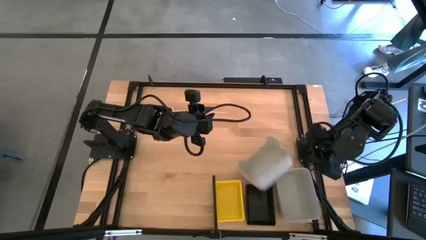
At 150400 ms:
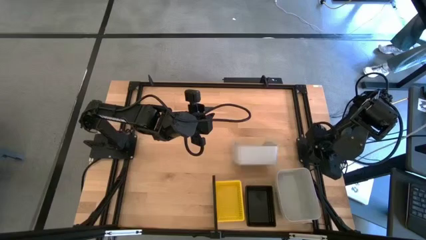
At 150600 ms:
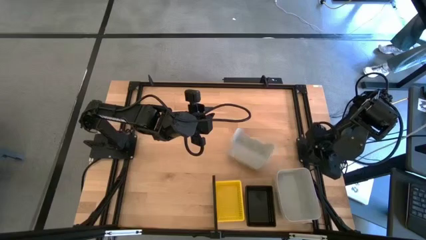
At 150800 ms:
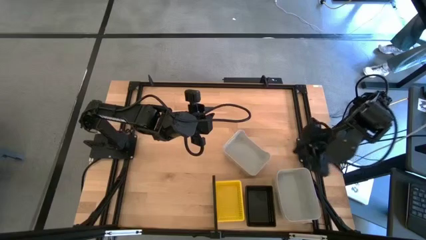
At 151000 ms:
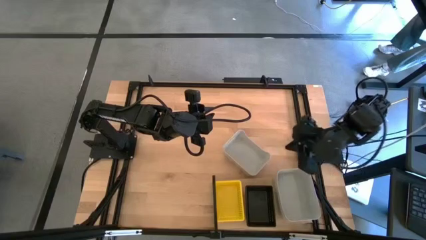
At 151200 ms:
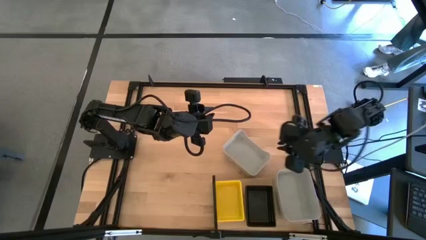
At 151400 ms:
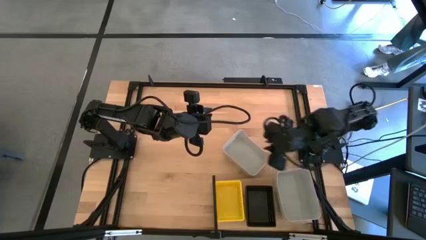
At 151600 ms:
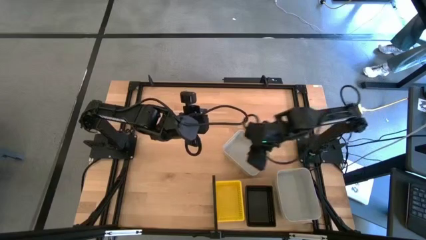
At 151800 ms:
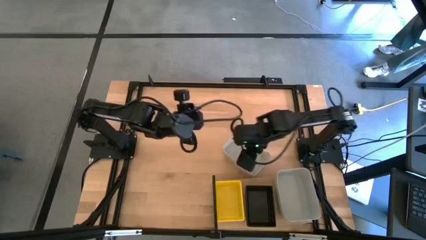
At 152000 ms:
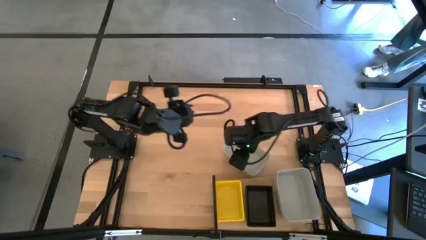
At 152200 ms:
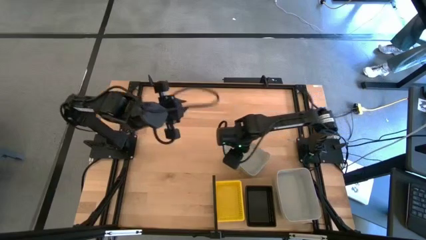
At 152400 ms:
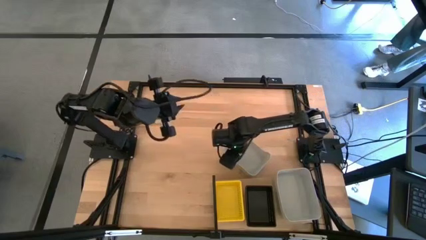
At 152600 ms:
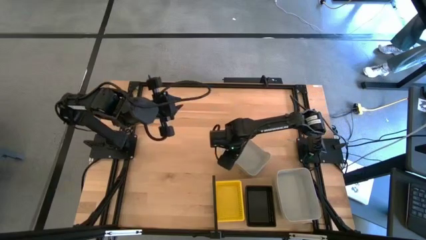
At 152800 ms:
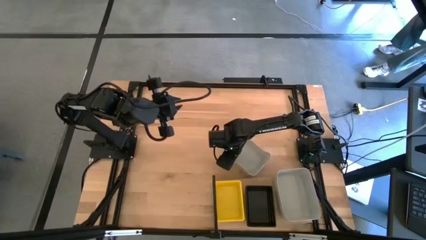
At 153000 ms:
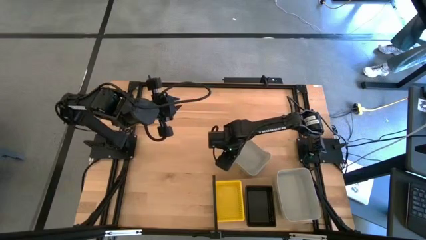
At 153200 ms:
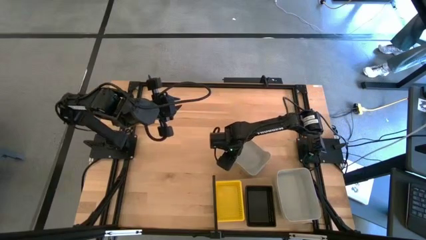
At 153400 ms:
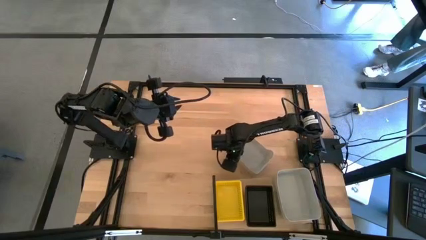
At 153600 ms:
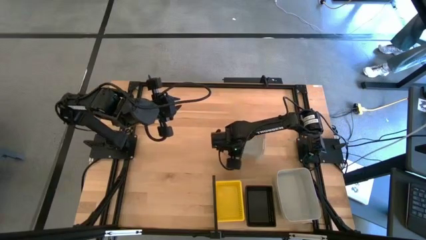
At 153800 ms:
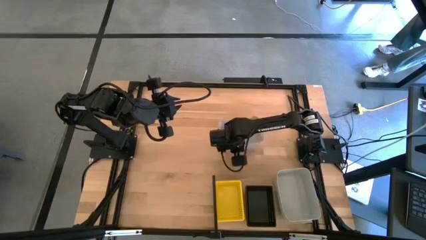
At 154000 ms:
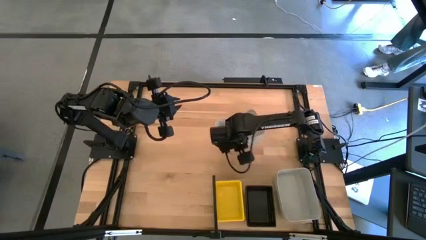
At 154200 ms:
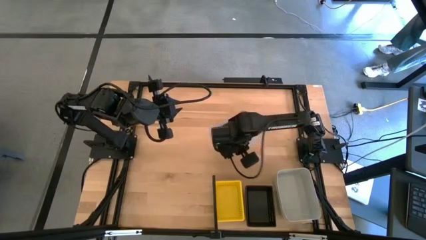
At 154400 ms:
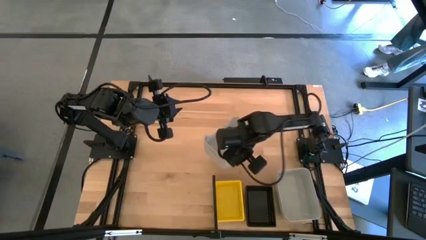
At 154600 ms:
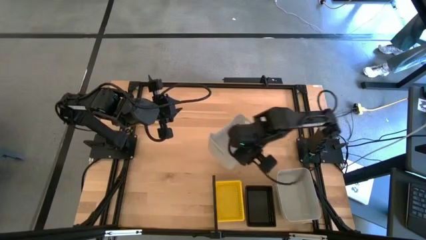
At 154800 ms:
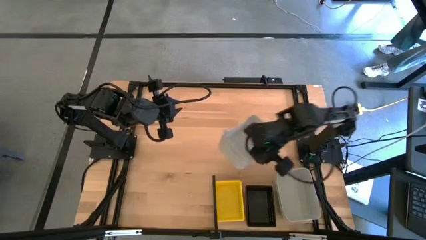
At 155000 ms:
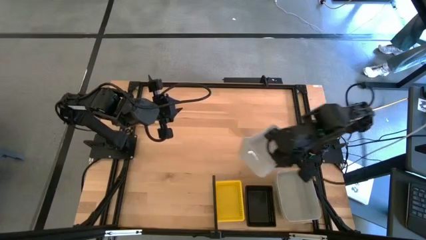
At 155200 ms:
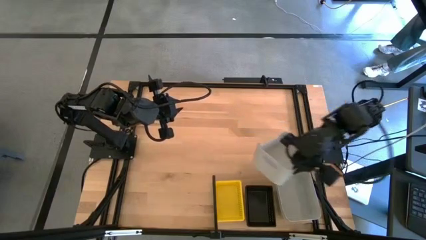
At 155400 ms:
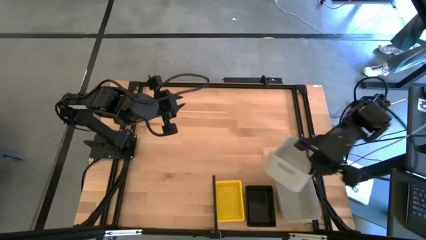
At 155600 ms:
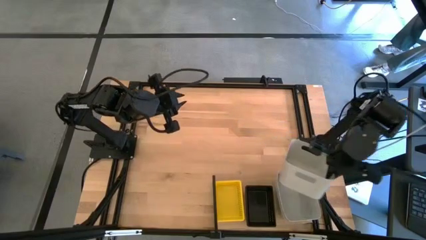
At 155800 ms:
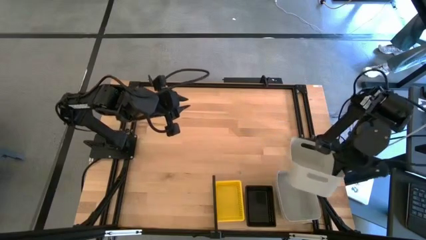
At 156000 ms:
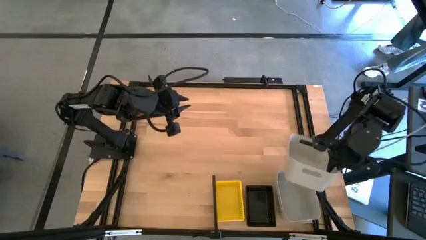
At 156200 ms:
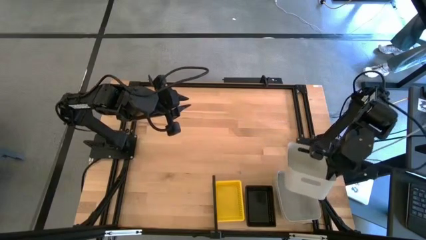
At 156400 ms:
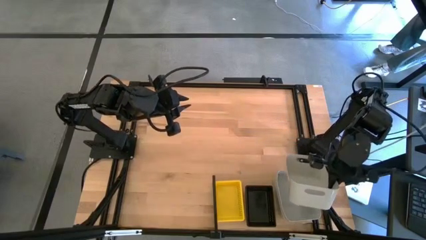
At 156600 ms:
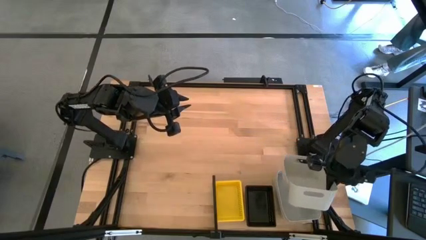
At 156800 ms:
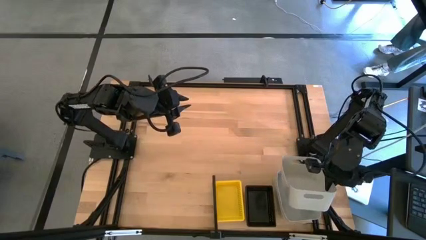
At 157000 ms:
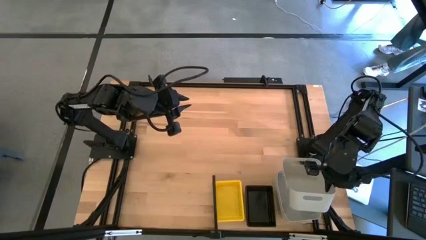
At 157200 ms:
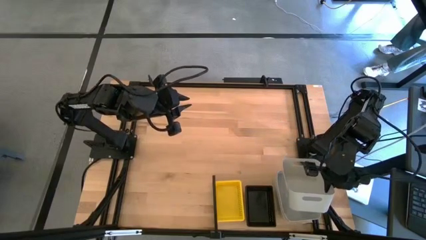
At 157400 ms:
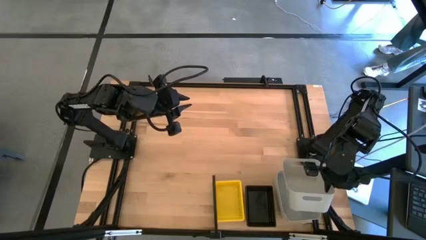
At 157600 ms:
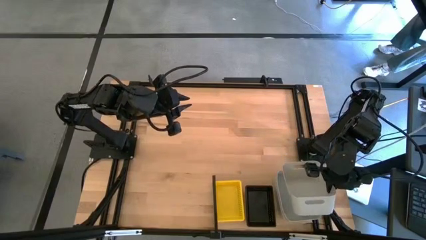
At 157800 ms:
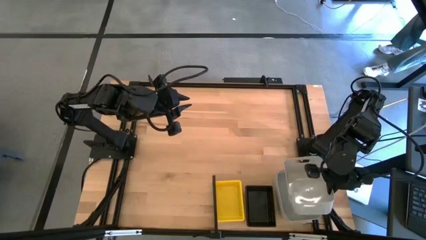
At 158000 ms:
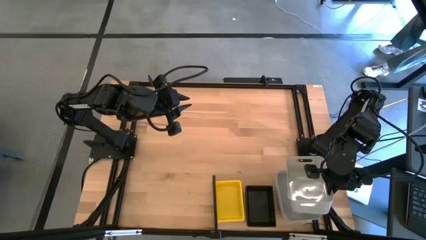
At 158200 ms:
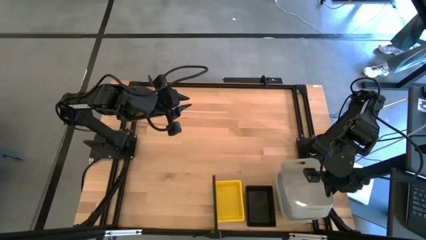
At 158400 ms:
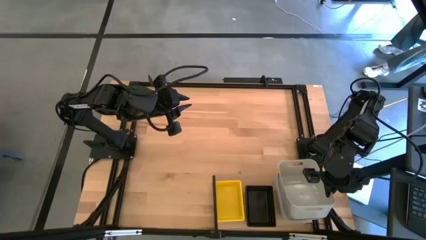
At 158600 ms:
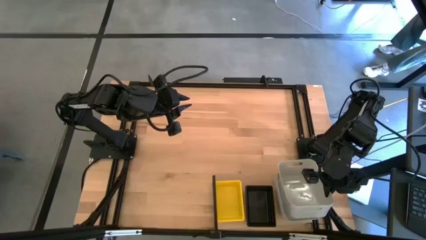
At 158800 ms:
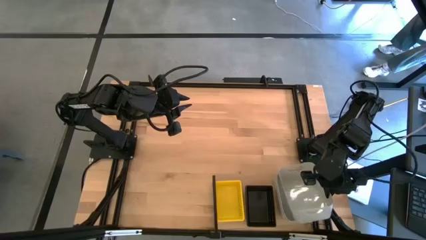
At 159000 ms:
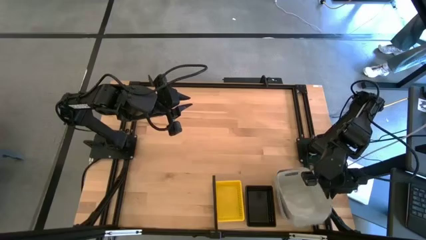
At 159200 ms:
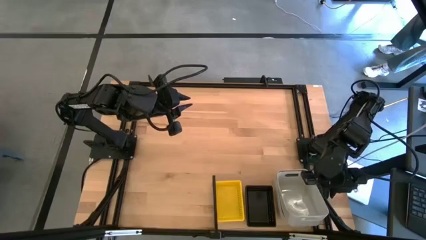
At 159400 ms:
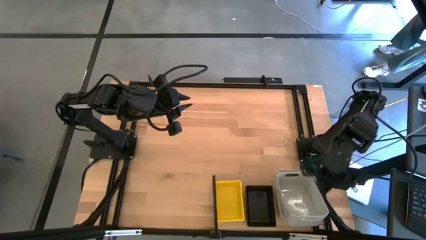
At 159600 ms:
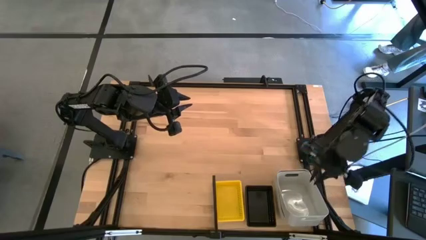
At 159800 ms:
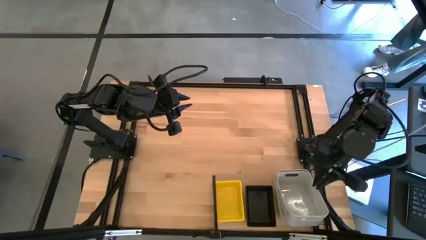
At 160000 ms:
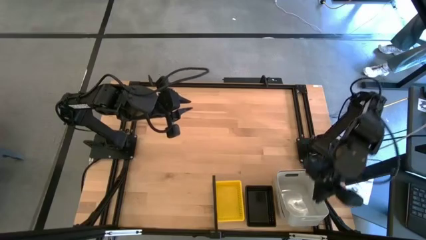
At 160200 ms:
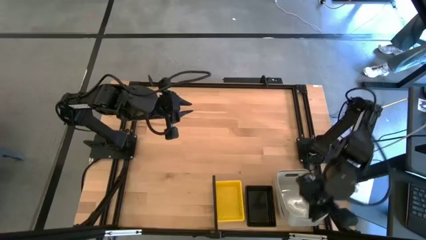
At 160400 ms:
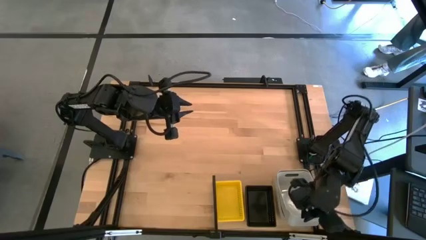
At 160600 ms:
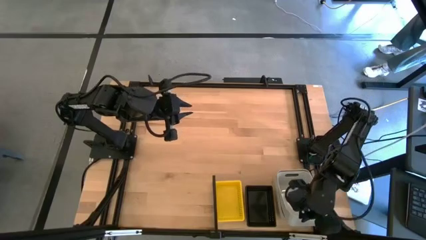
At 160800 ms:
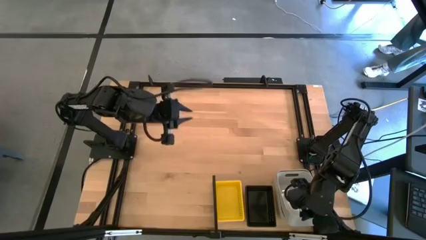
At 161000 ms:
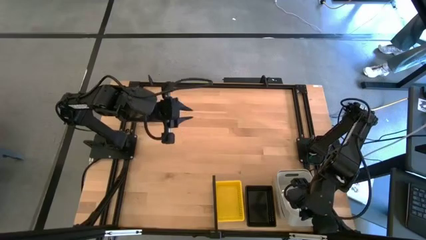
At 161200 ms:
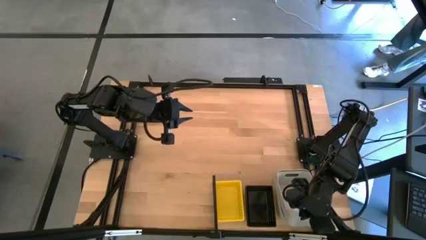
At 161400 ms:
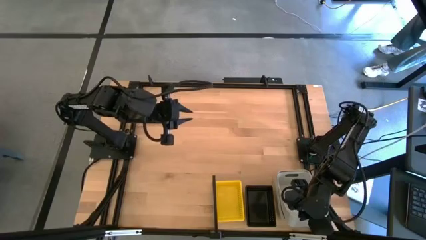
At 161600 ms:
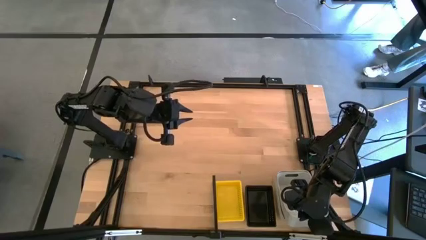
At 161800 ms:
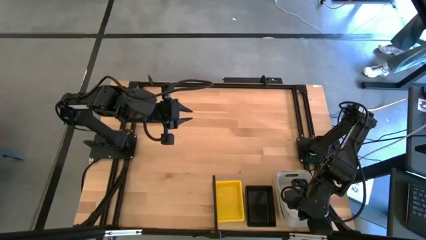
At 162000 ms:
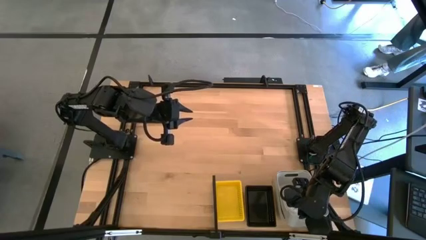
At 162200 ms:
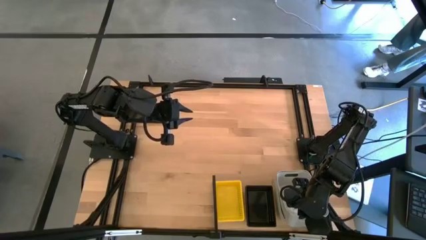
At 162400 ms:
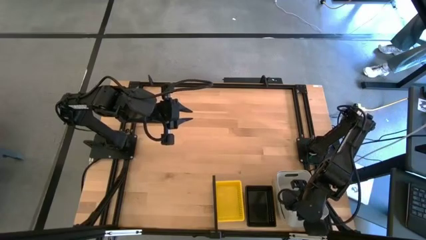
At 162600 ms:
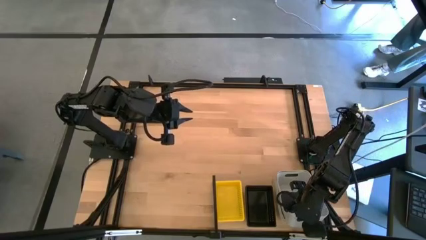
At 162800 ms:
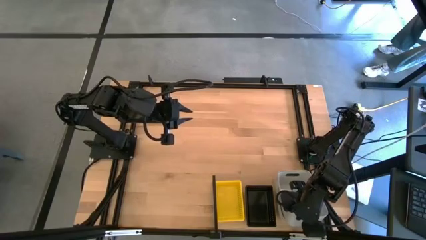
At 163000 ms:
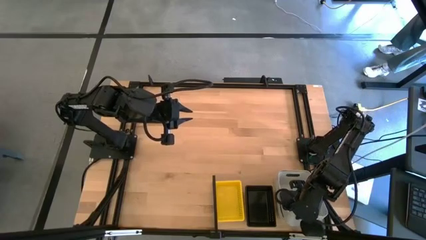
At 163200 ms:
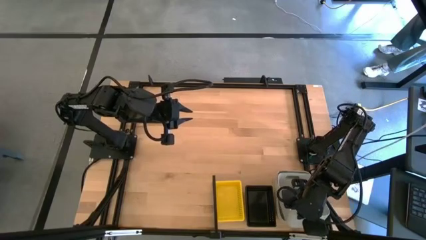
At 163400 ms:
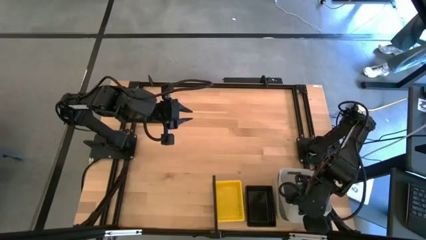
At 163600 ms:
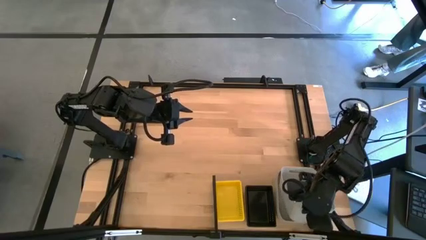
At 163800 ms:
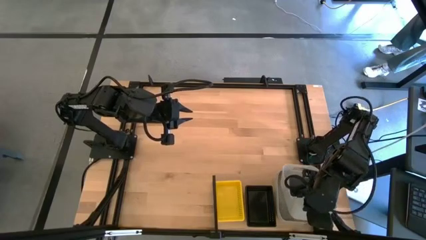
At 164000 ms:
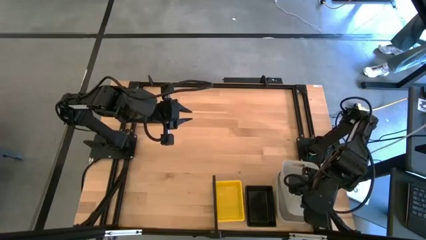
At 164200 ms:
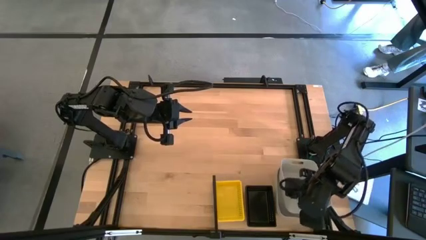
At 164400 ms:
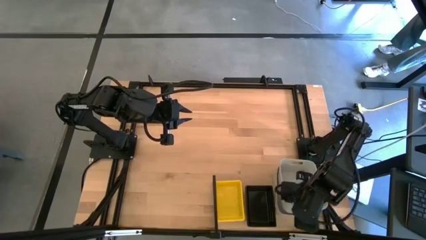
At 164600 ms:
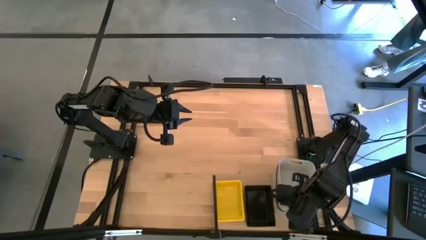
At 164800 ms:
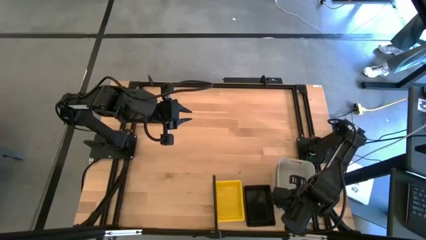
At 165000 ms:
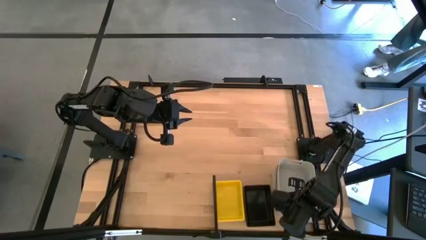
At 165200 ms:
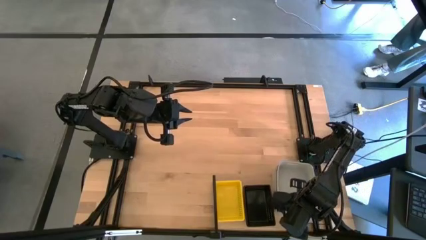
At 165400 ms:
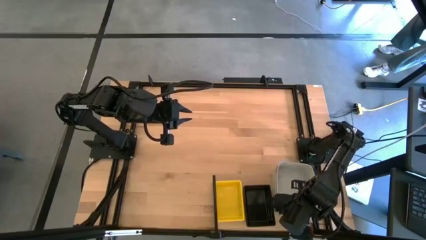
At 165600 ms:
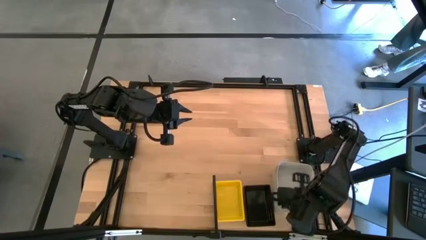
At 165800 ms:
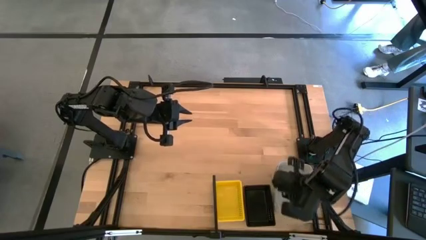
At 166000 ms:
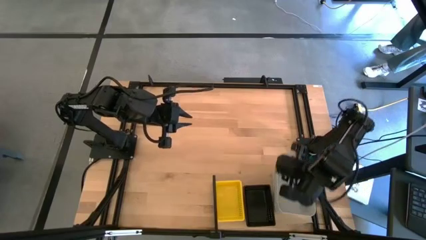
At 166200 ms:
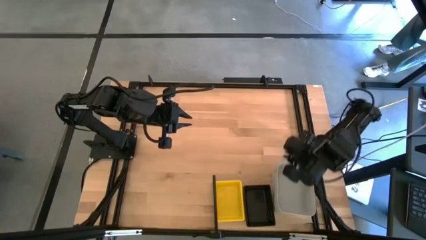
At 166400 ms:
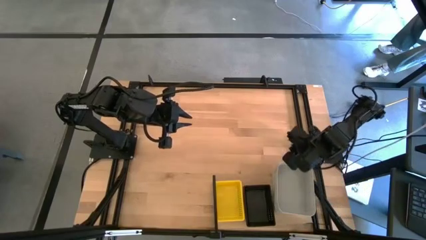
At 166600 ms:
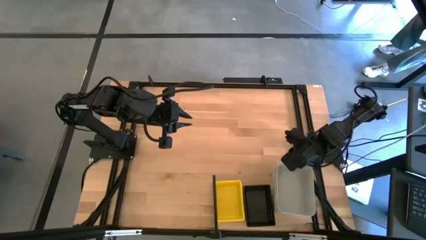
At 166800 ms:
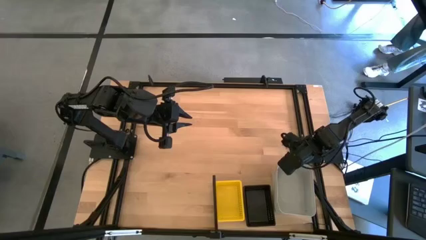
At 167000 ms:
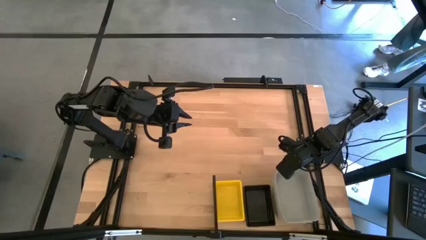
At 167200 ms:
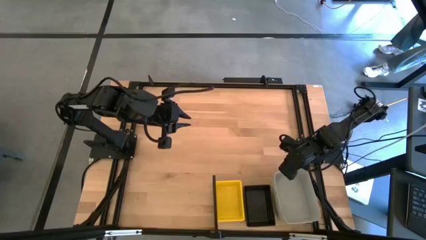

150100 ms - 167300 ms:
Task: Stack baskets on shelf by color
Stack the gray bin on top of the gray bin on the shelf
